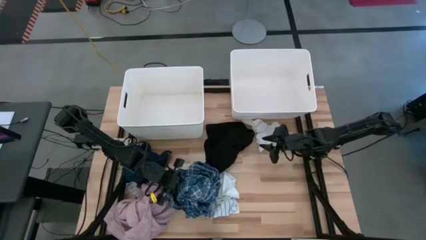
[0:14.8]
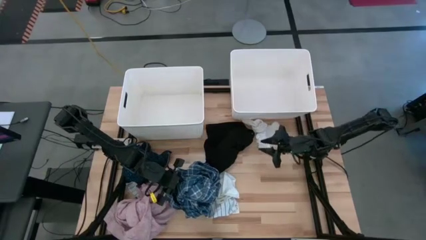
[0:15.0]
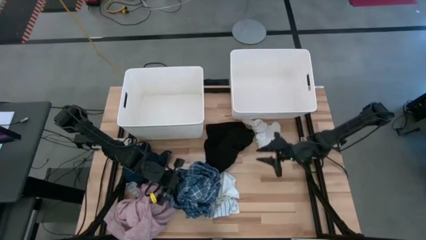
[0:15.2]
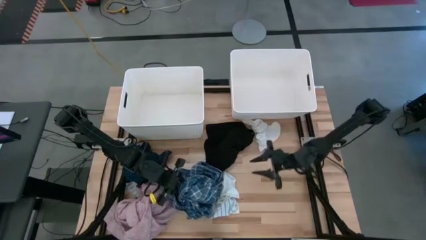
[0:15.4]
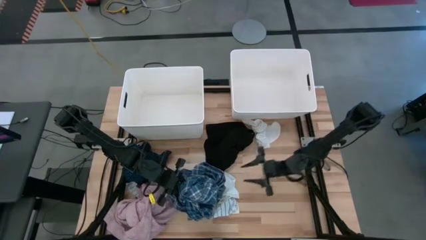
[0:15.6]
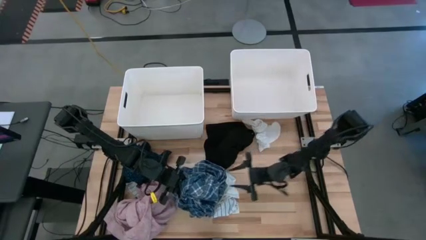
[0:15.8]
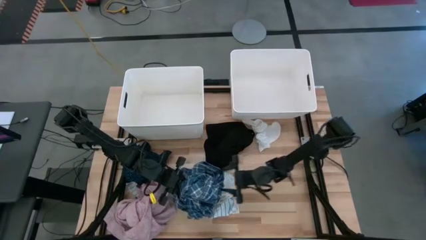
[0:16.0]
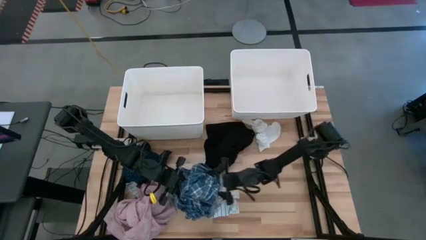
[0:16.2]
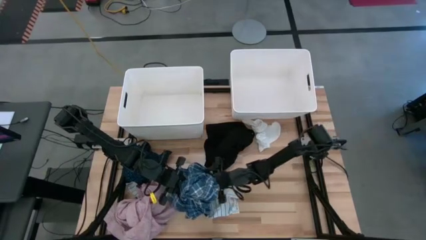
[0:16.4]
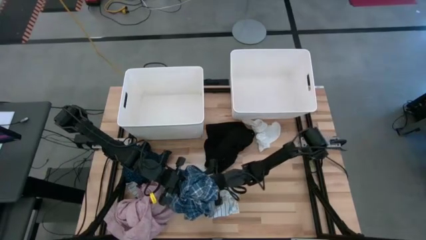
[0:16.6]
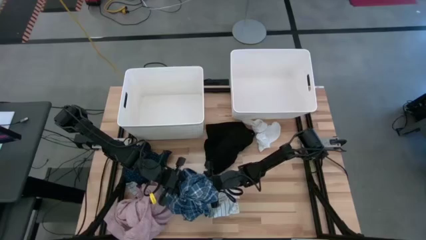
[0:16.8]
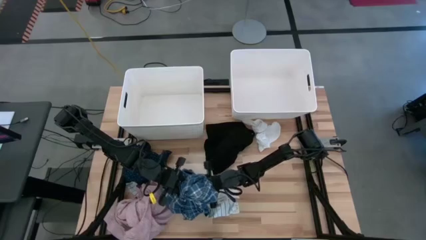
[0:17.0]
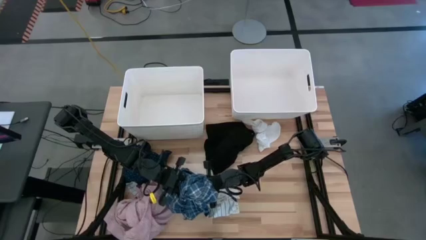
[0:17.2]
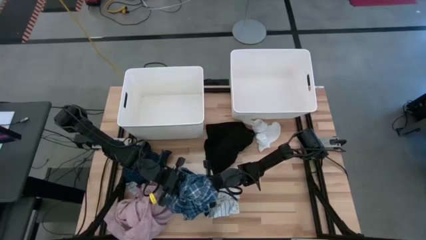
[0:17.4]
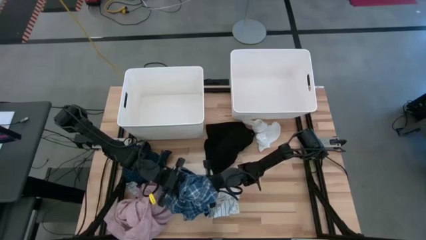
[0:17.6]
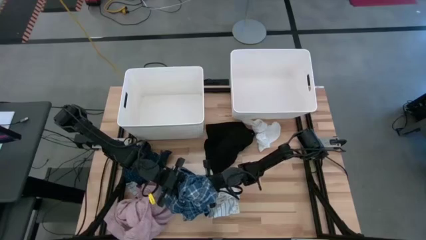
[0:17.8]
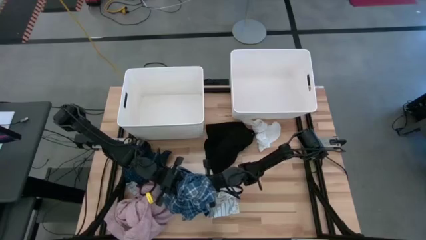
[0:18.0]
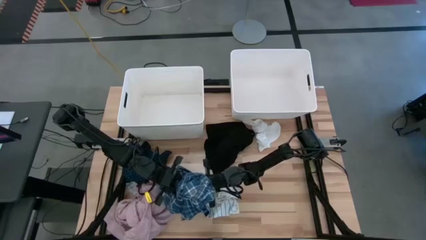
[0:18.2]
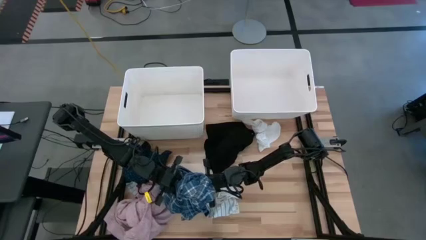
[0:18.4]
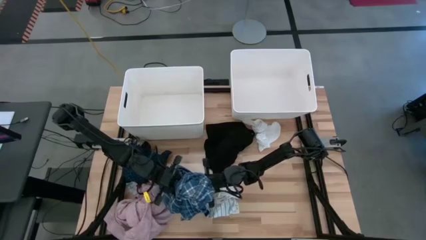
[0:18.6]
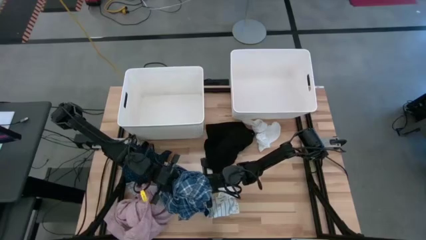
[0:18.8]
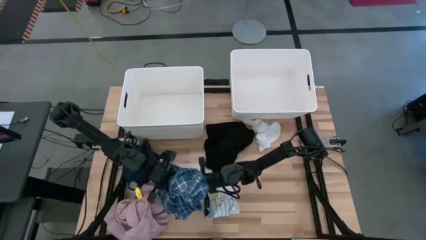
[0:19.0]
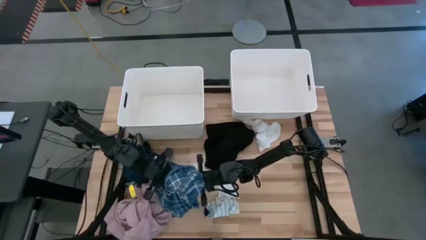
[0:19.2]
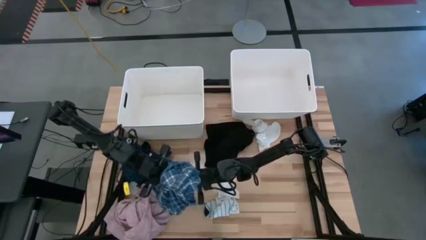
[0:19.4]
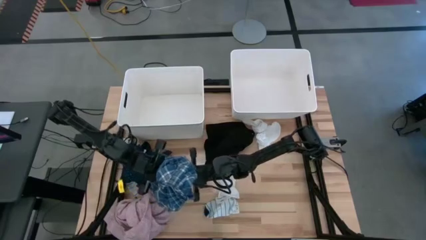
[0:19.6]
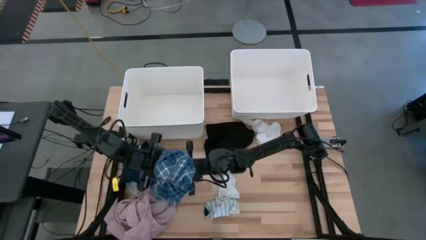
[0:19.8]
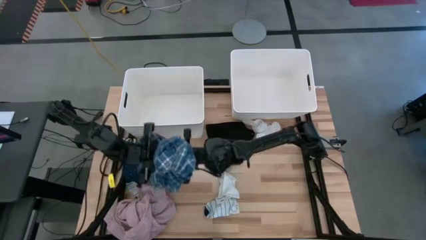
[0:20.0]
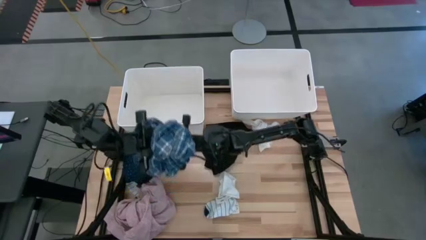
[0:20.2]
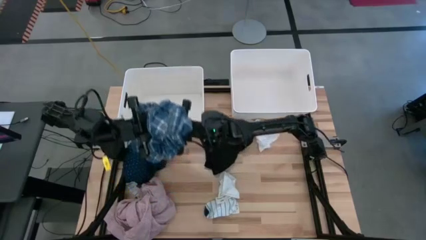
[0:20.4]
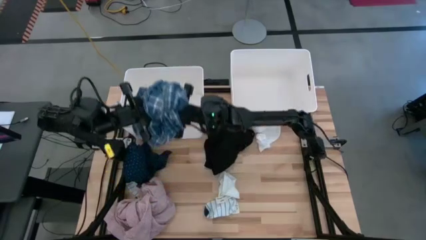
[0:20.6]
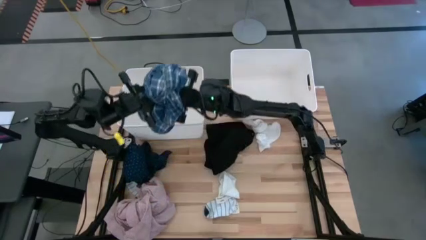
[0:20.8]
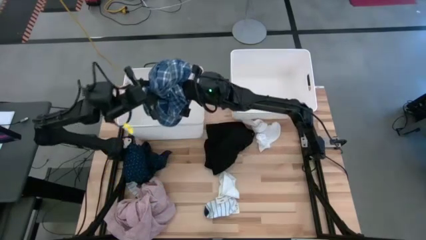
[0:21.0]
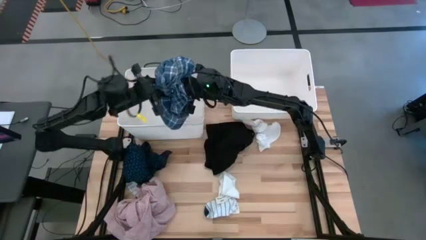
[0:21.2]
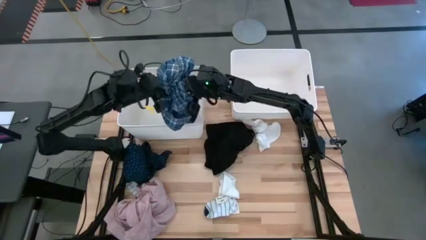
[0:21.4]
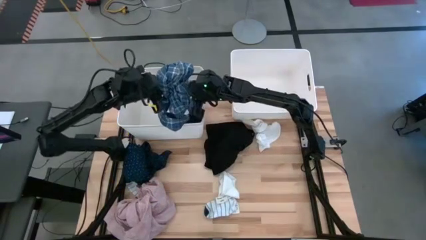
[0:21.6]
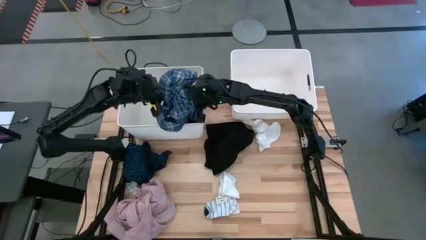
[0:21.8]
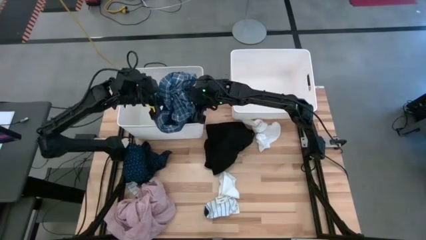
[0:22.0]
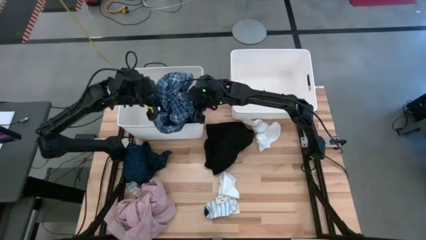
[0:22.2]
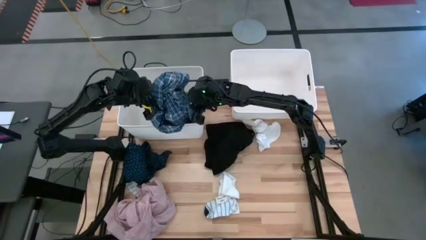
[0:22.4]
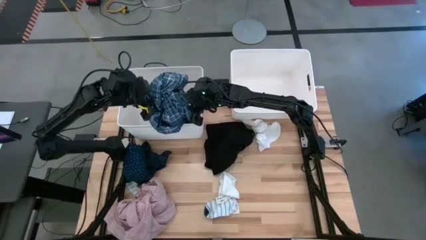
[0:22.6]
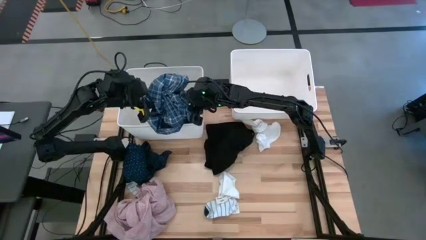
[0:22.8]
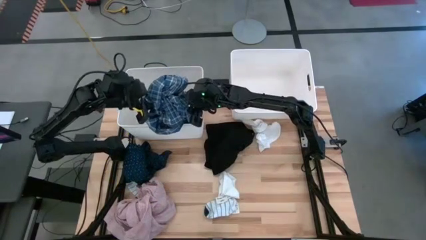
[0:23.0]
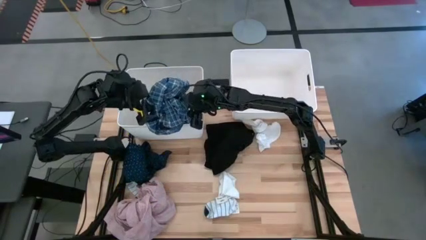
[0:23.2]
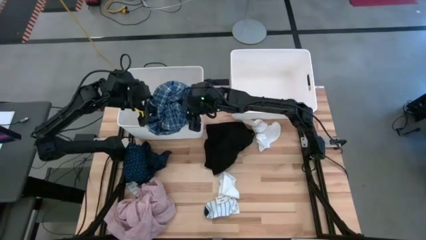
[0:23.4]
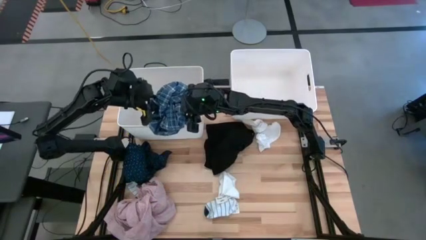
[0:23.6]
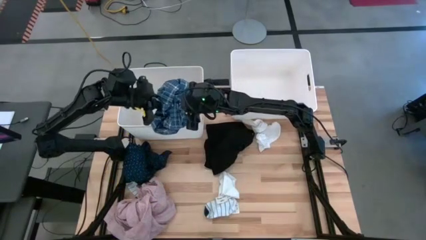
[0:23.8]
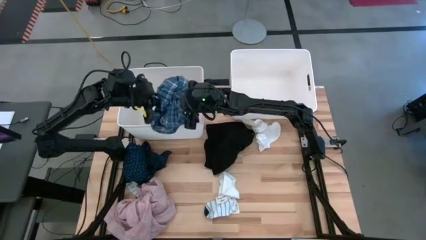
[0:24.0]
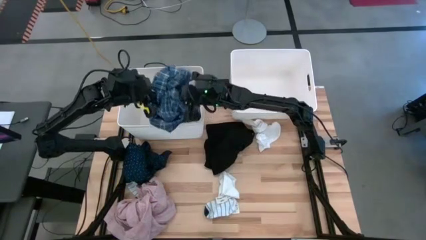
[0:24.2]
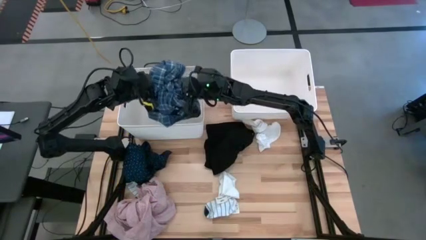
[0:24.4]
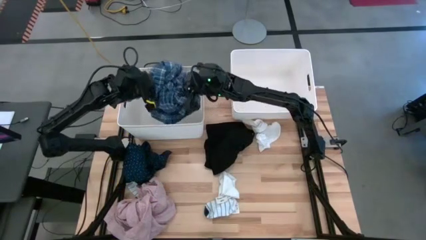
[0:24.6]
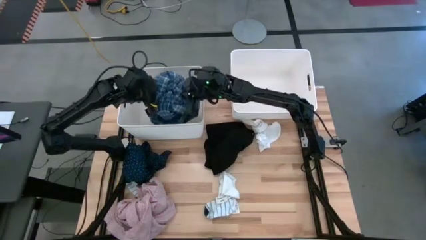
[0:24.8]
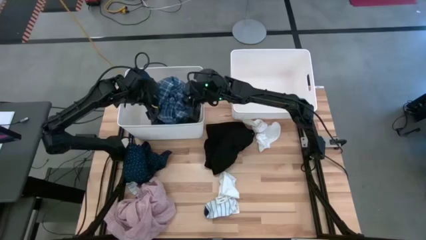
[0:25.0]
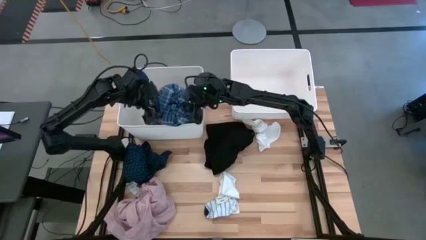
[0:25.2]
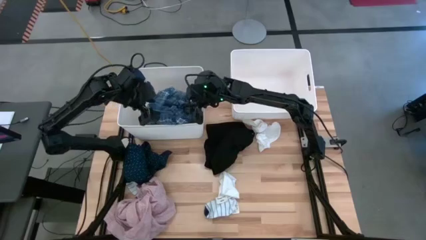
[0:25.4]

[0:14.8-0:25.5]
Task: Sort clothes
Put the blue patterned polo shirt into the left laundry bin
